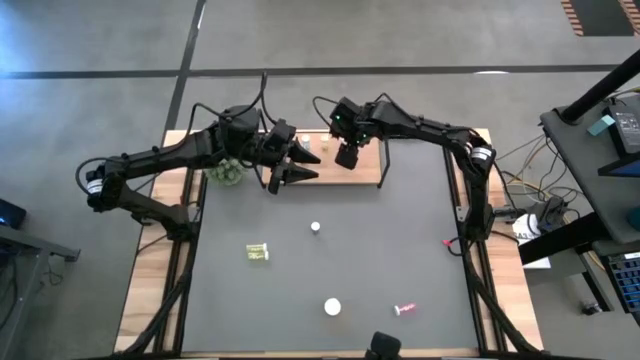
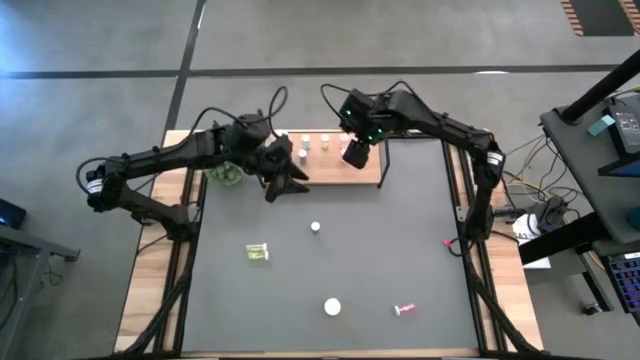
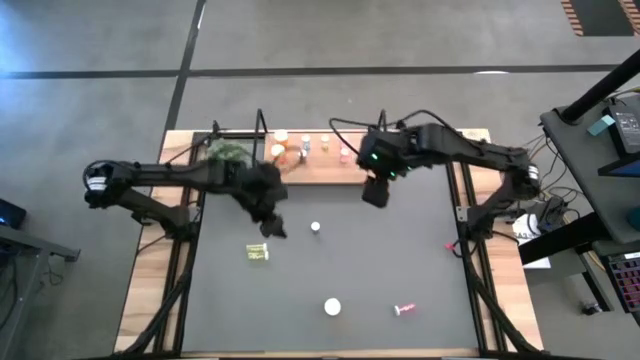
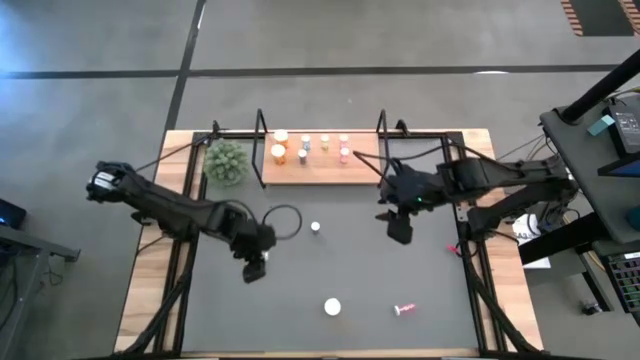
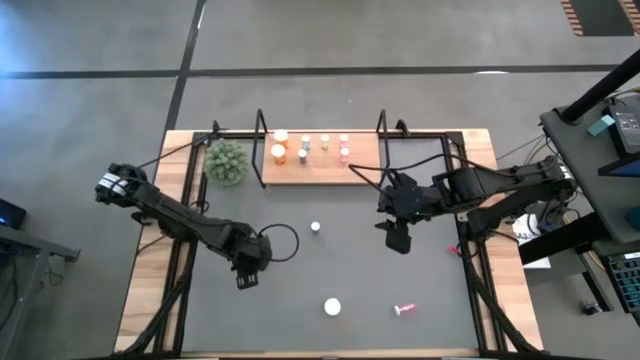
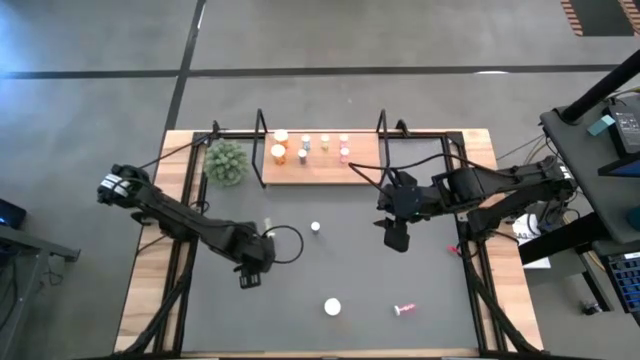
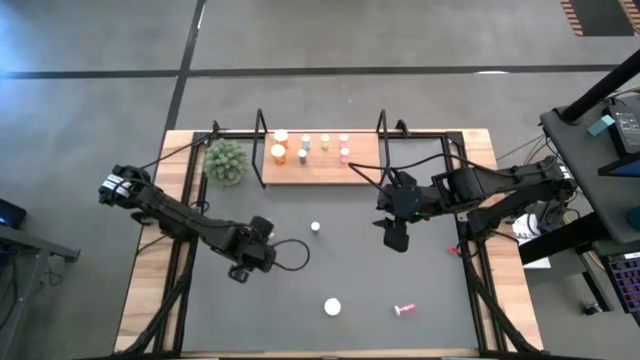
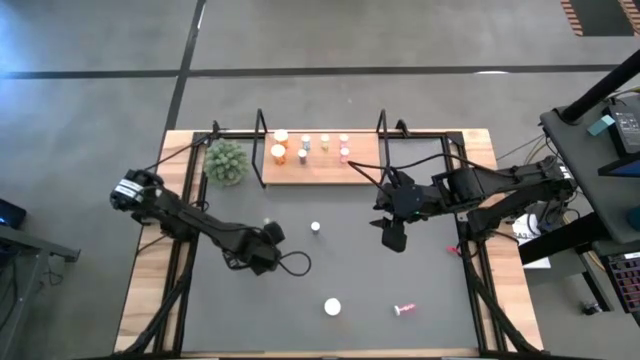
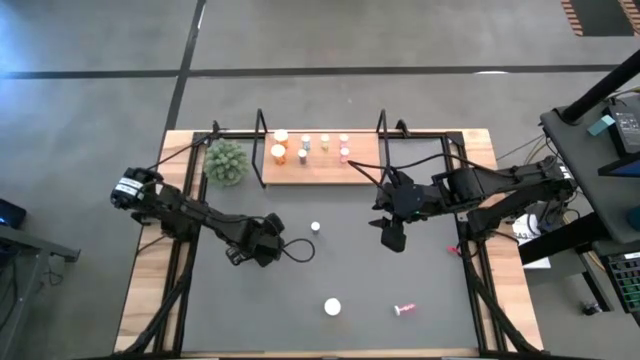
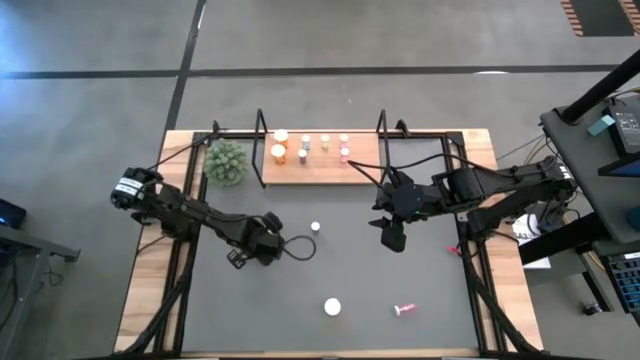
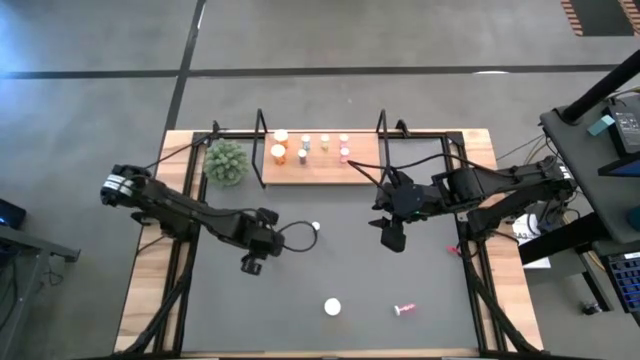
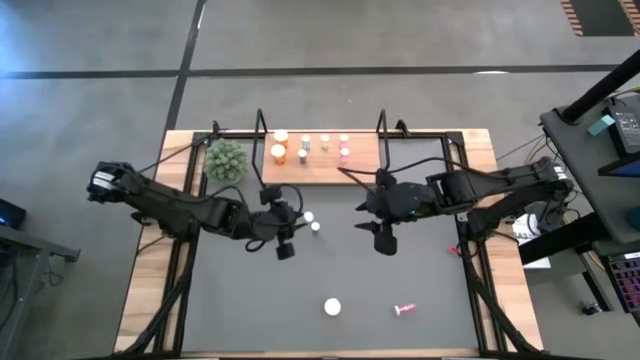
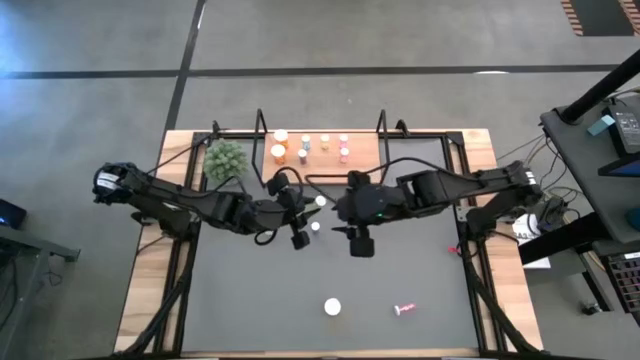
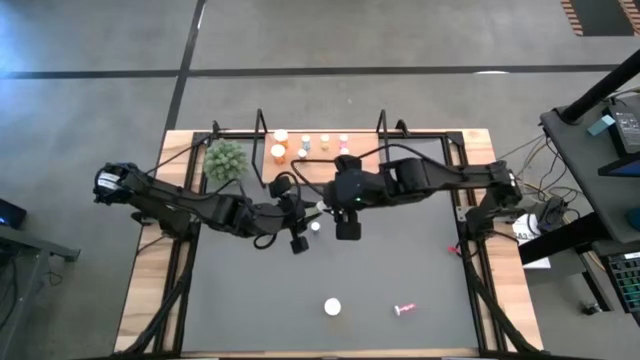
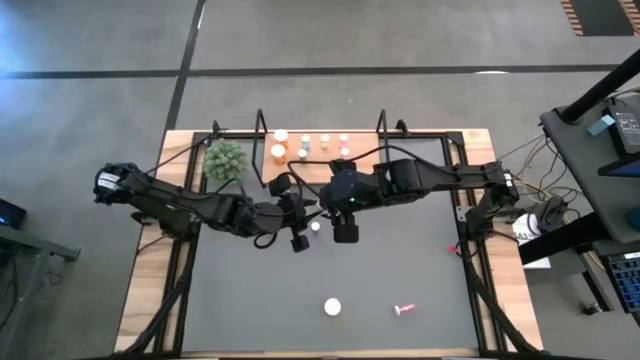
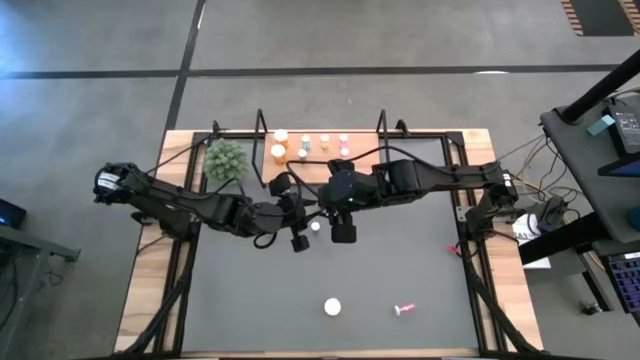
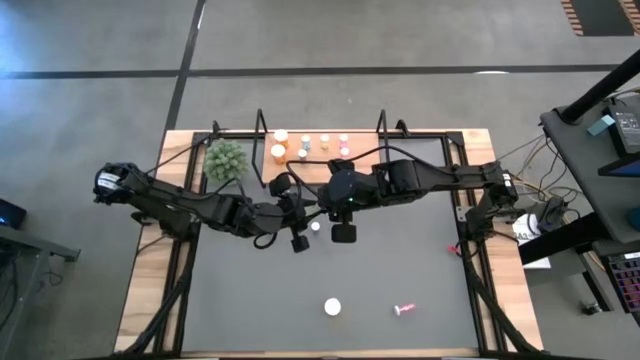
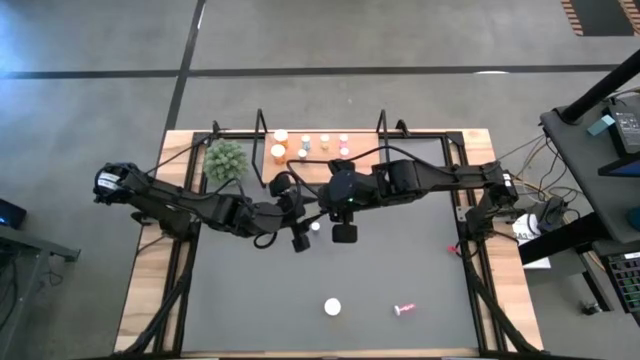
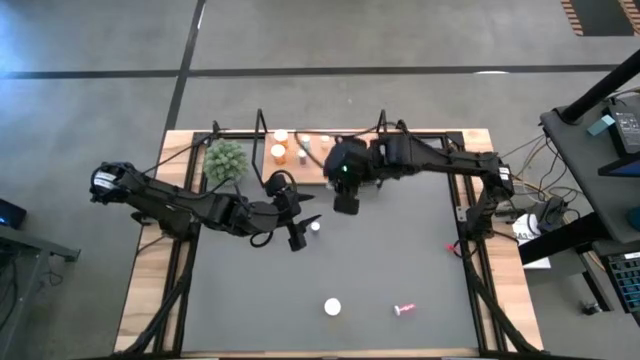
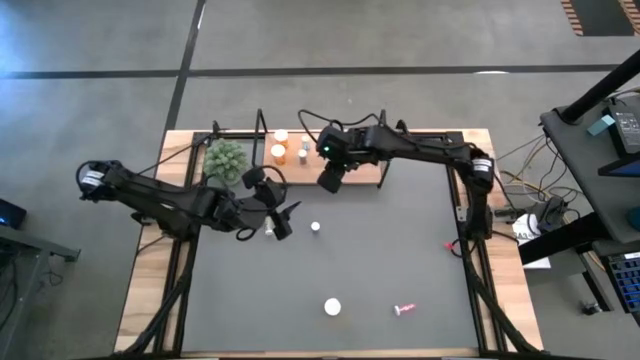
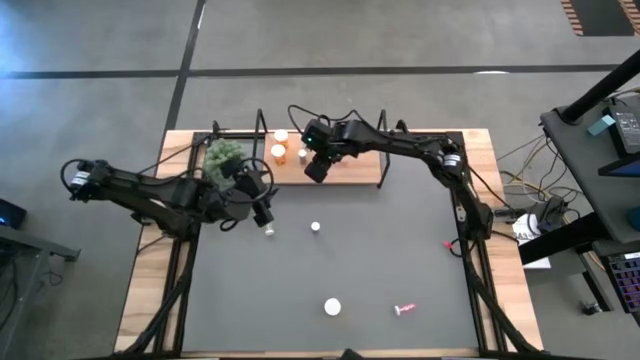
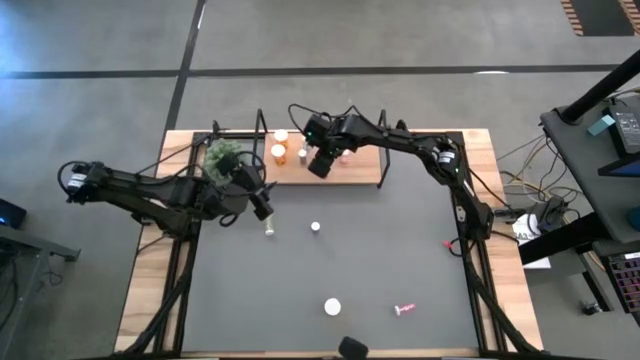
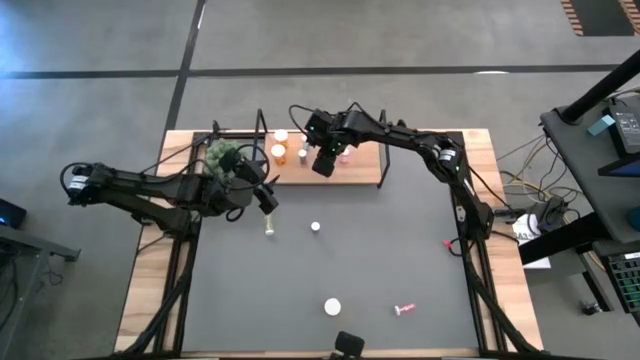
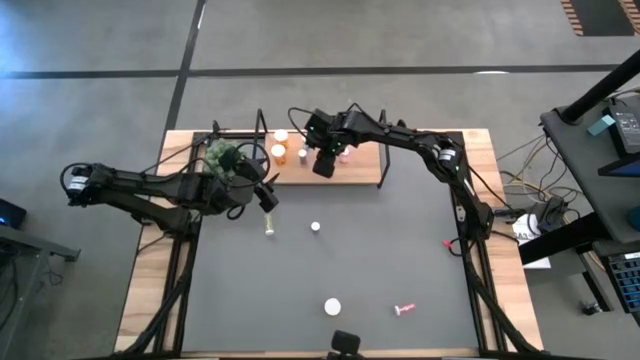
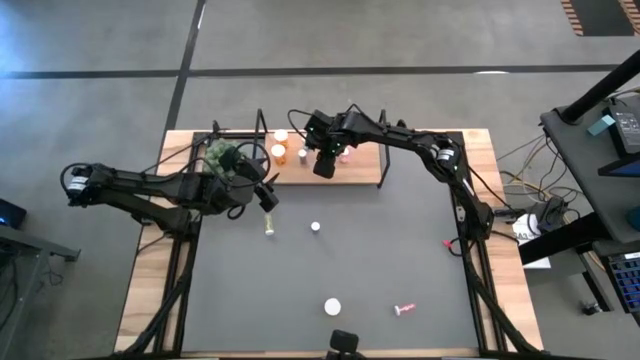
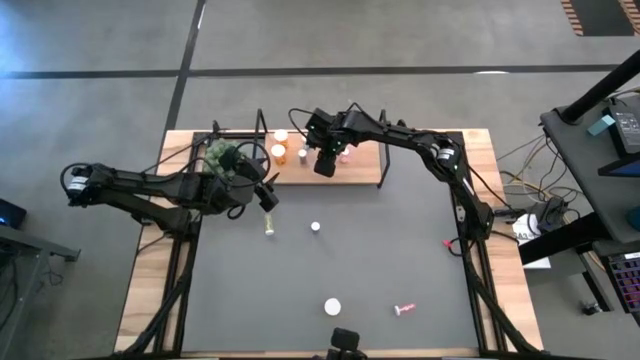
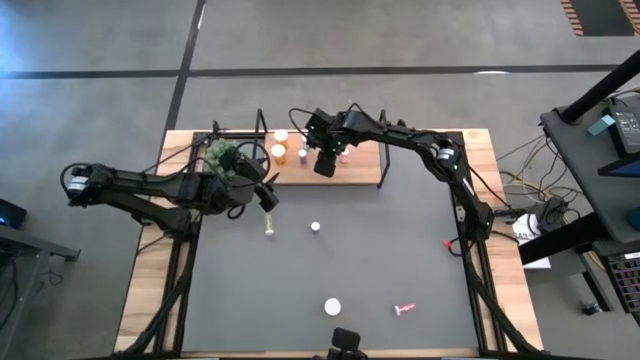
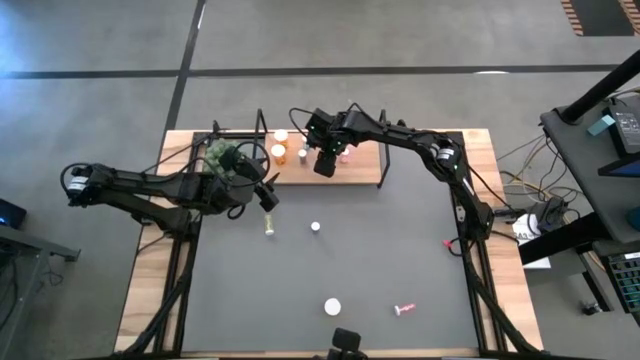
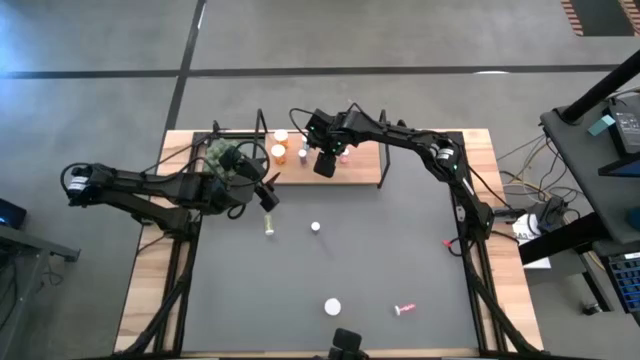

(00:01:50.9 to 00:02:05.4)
Task: Pick and place medicine bottles onto shelf by color
Put the bottom yellow pill bottle on the shelf aligned with the other yellow pill bottle

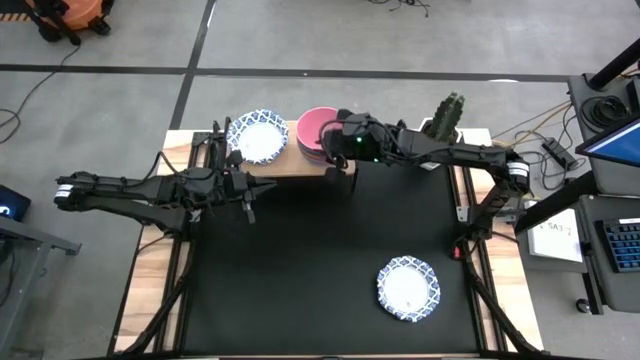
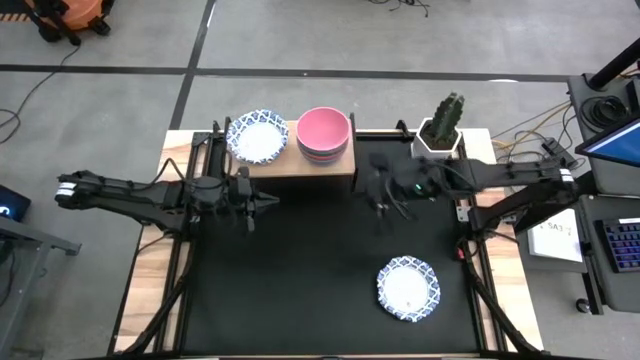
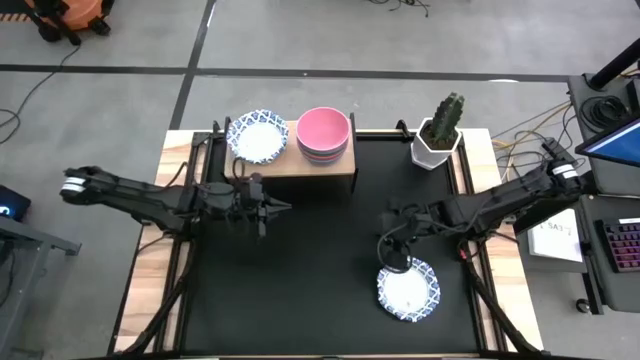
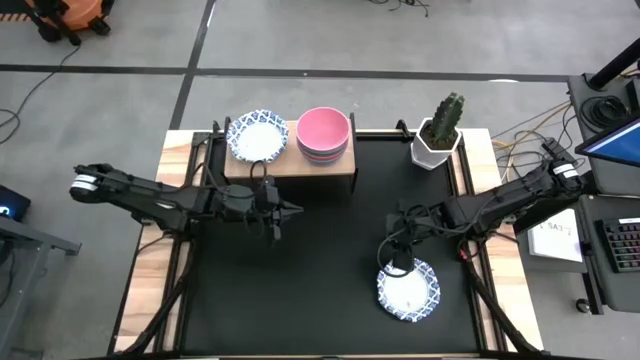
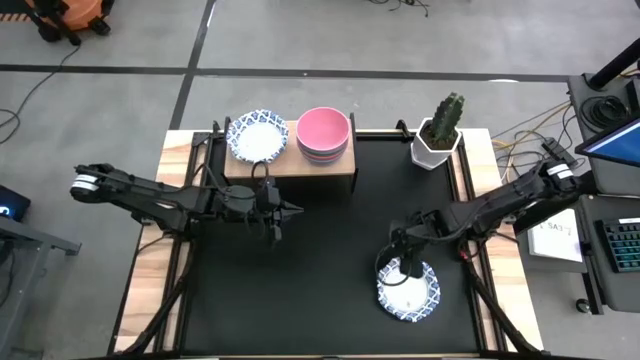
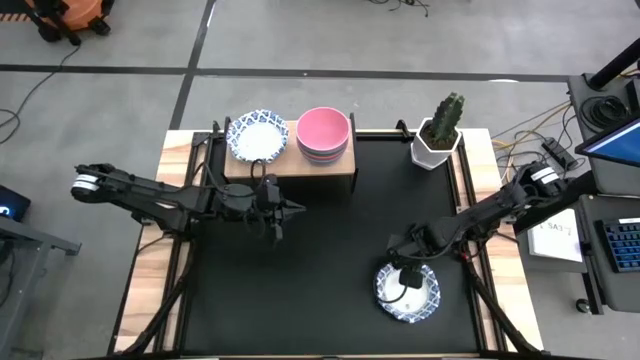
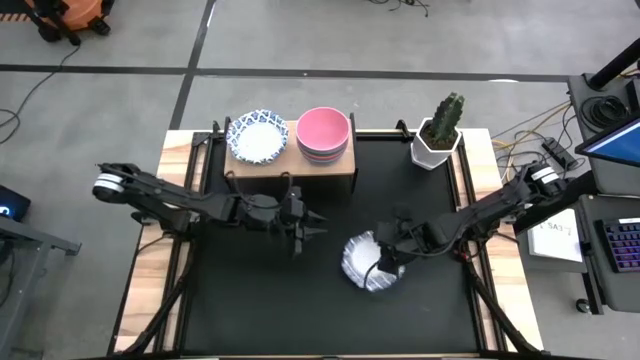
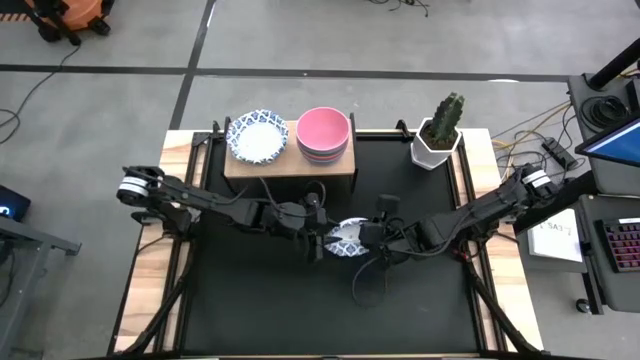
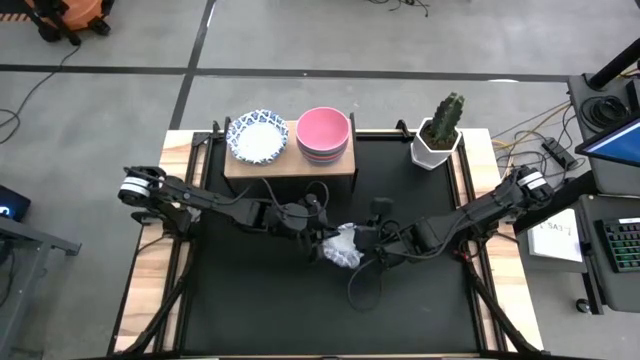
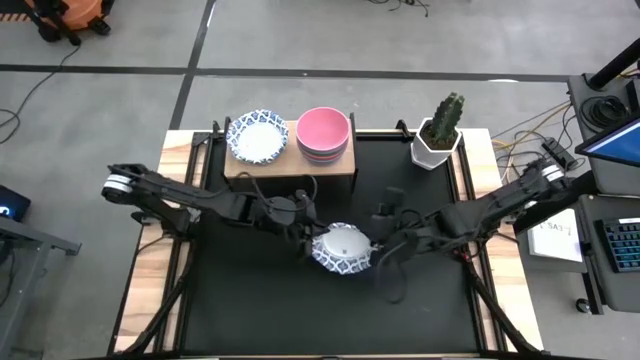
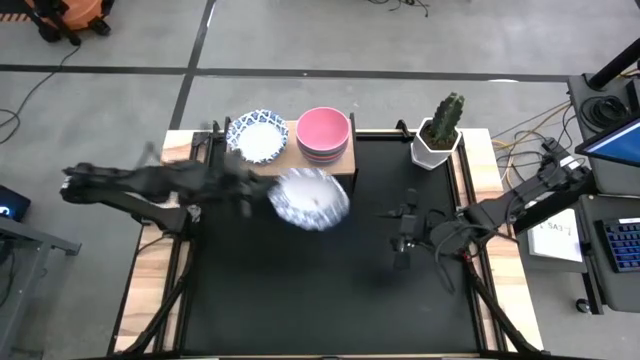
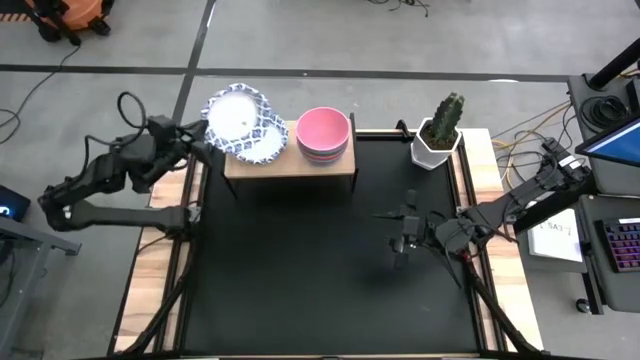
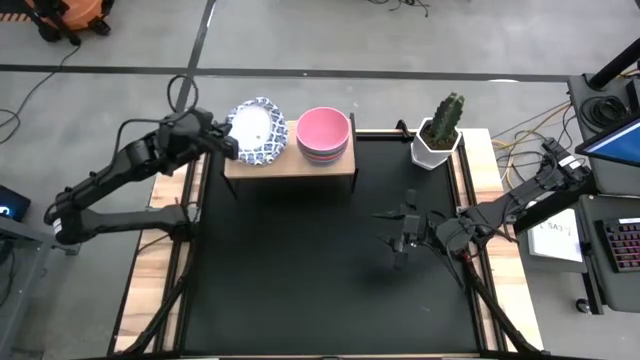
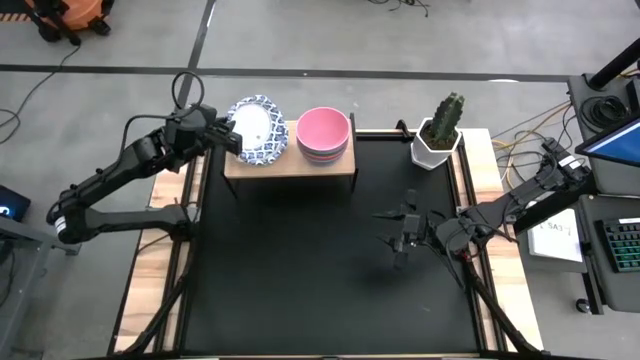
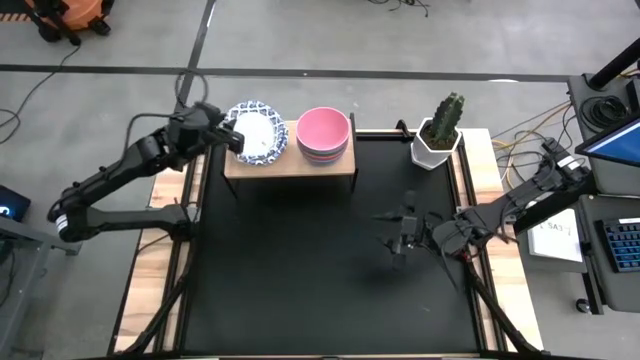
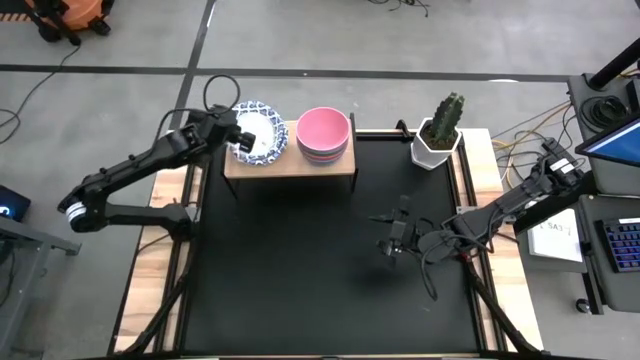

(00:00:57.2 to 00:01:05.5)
Task: Place and stack bowls onto a shelf
Stack the white patterned bowl on top of the white patterned bowl on the shelf
